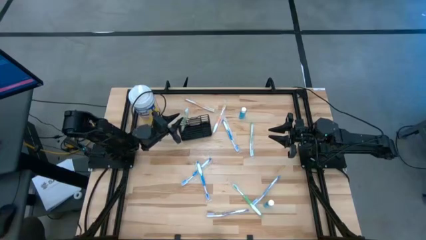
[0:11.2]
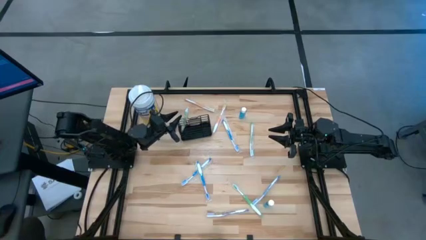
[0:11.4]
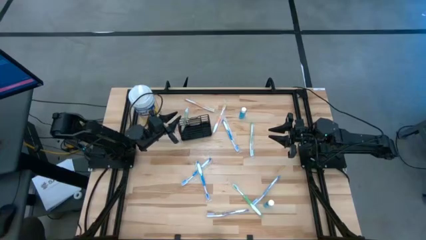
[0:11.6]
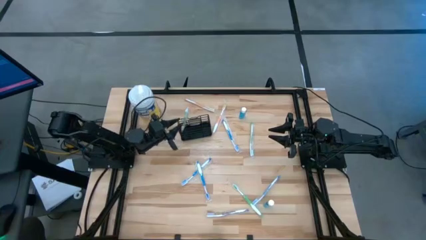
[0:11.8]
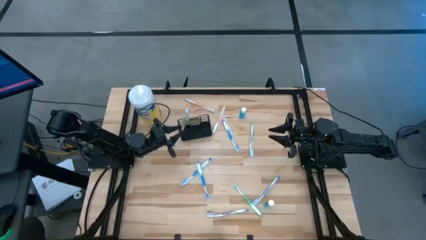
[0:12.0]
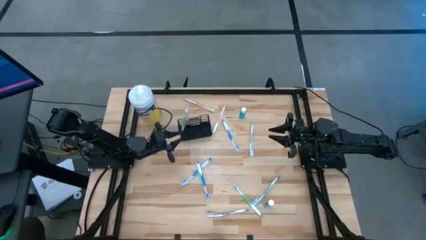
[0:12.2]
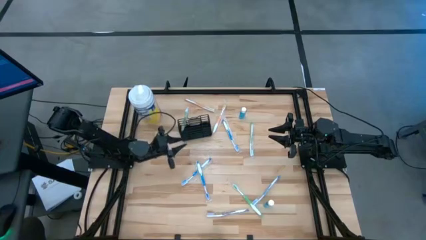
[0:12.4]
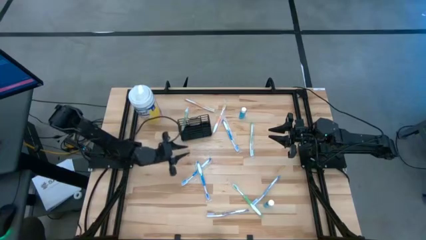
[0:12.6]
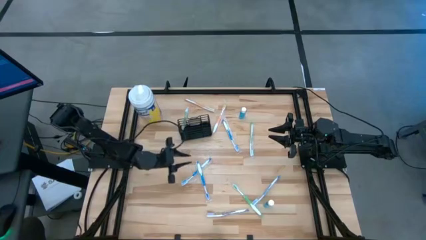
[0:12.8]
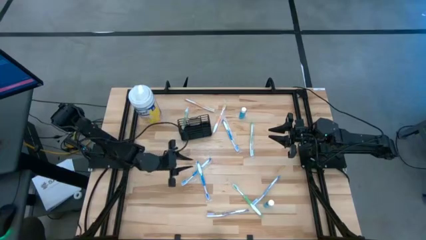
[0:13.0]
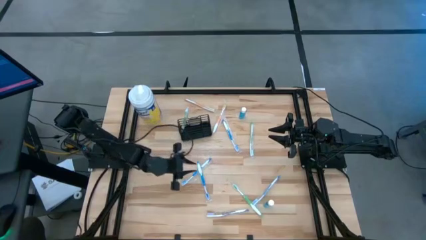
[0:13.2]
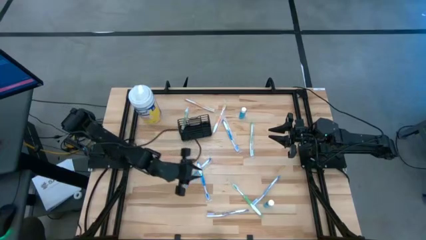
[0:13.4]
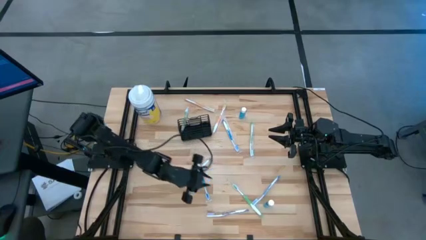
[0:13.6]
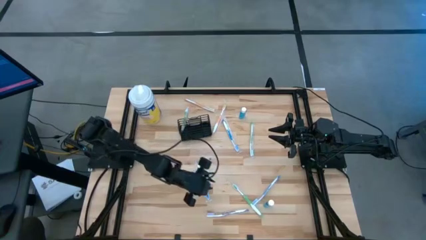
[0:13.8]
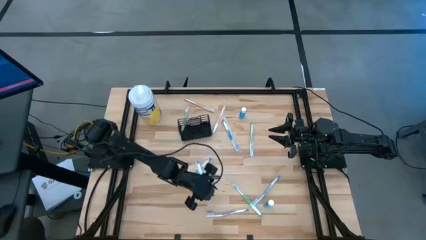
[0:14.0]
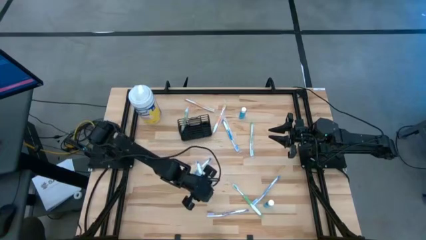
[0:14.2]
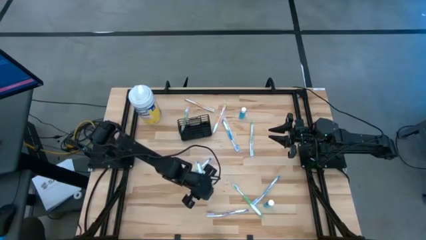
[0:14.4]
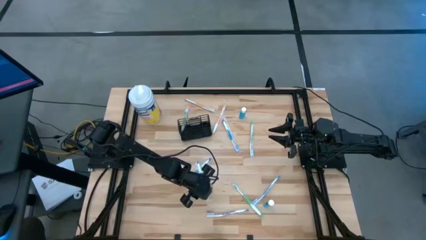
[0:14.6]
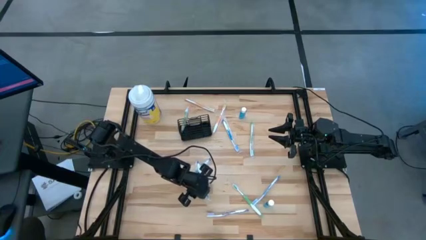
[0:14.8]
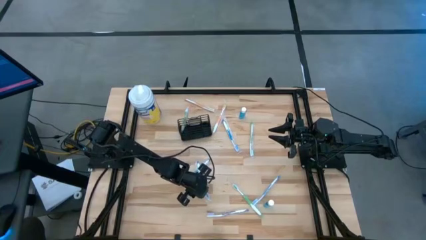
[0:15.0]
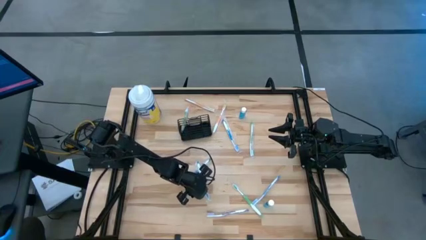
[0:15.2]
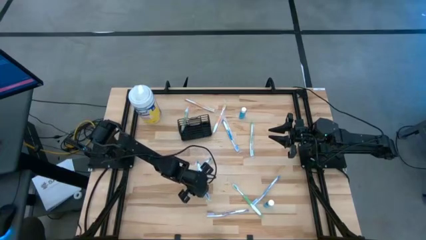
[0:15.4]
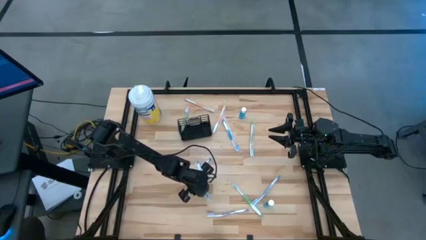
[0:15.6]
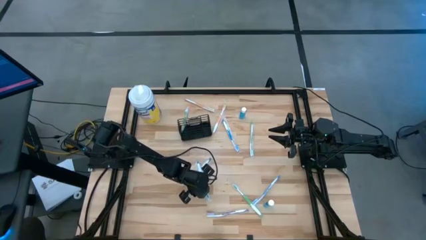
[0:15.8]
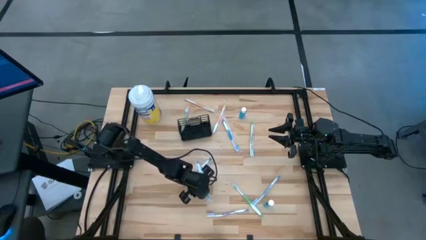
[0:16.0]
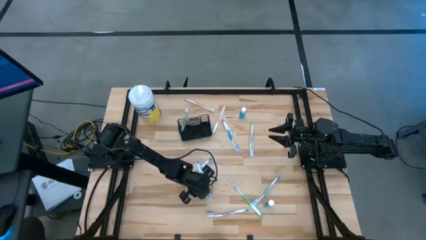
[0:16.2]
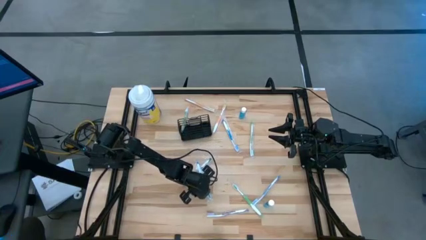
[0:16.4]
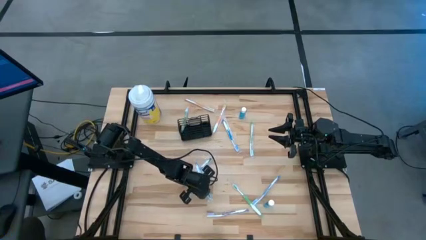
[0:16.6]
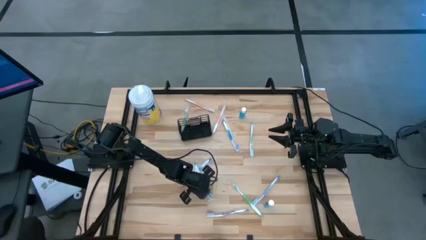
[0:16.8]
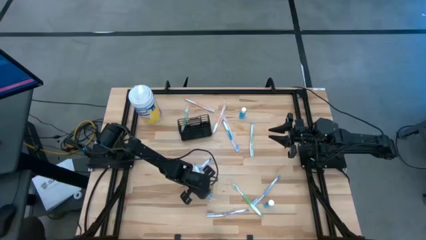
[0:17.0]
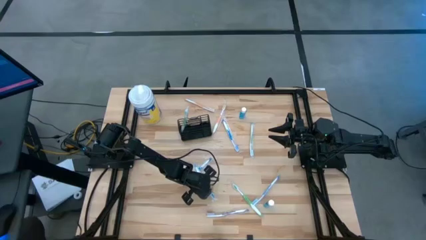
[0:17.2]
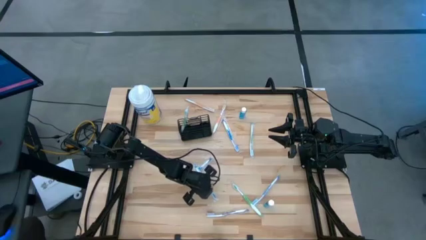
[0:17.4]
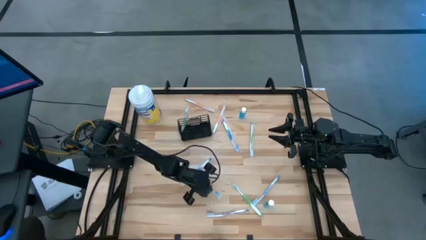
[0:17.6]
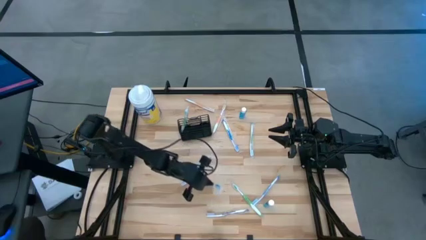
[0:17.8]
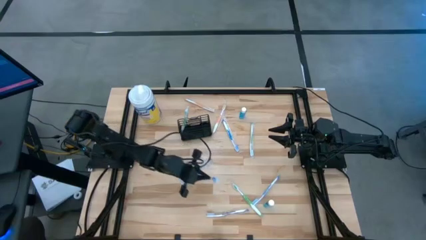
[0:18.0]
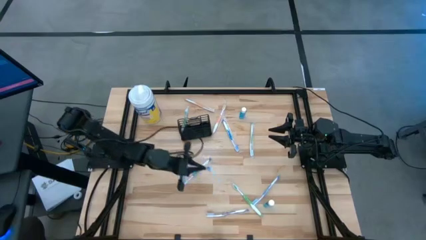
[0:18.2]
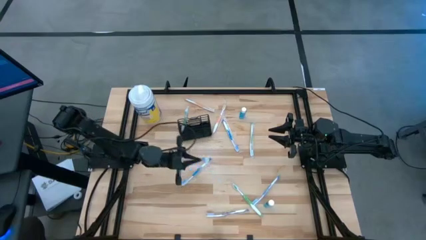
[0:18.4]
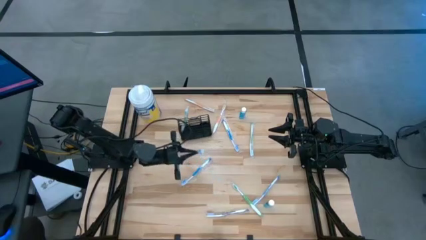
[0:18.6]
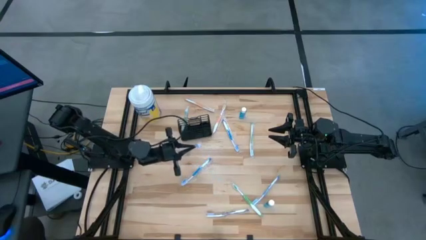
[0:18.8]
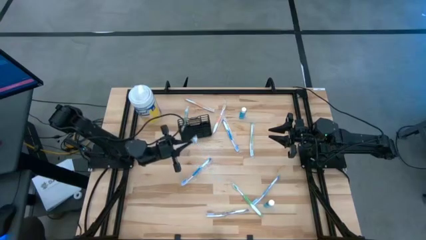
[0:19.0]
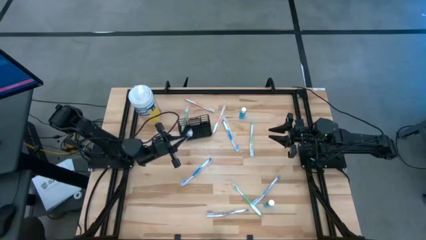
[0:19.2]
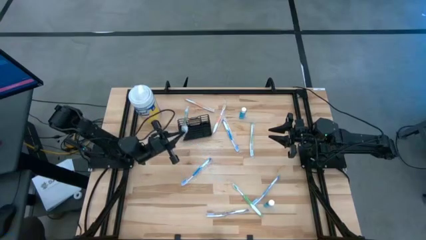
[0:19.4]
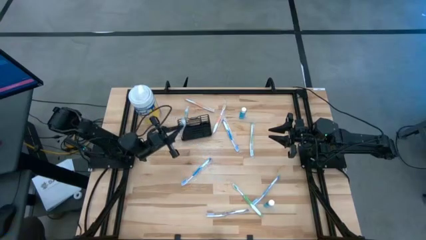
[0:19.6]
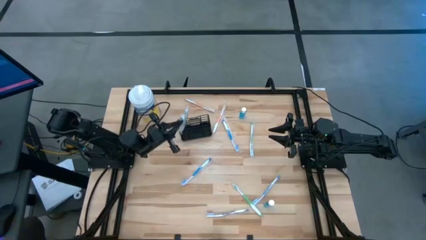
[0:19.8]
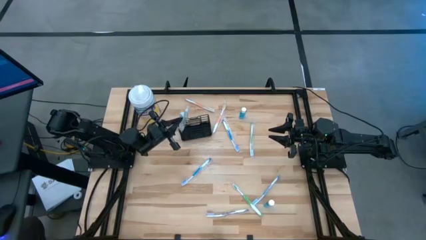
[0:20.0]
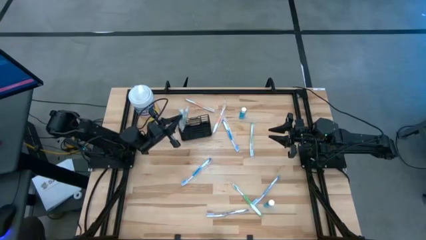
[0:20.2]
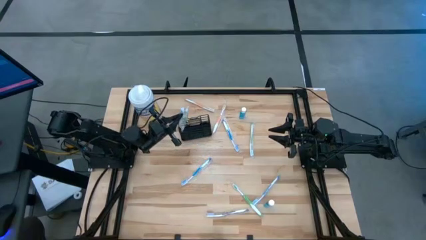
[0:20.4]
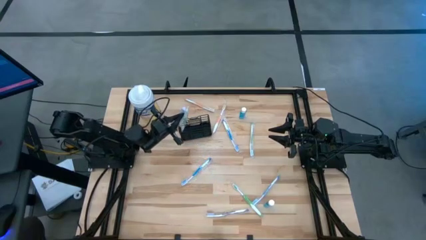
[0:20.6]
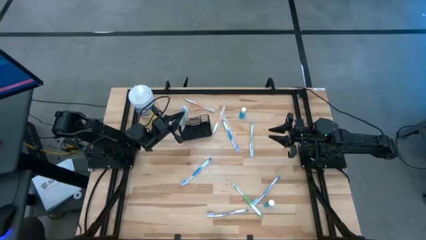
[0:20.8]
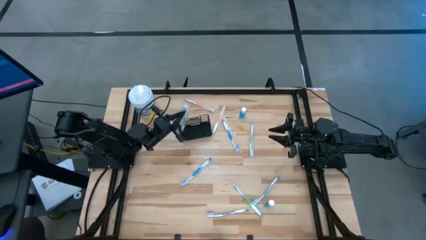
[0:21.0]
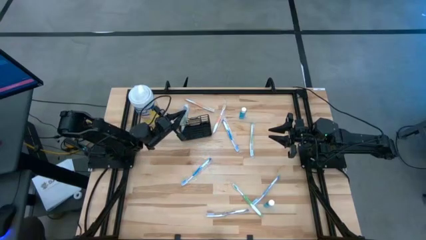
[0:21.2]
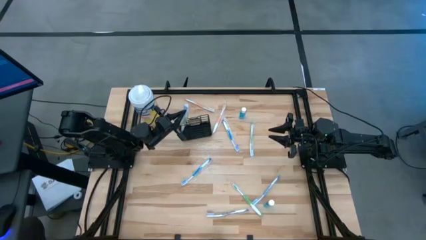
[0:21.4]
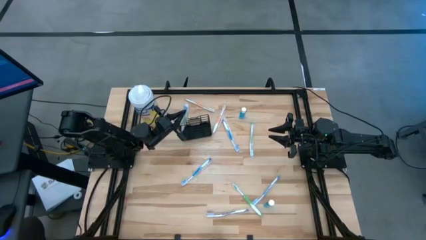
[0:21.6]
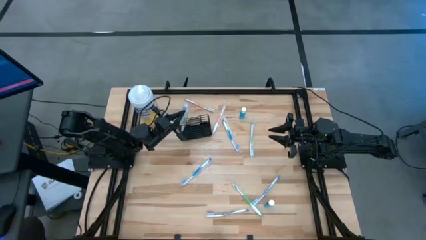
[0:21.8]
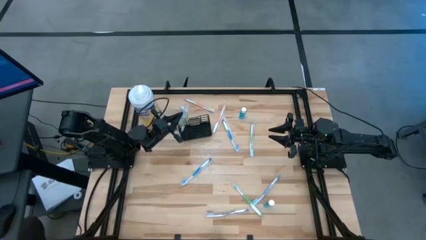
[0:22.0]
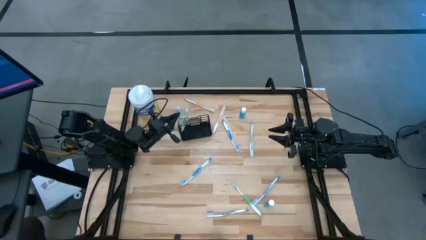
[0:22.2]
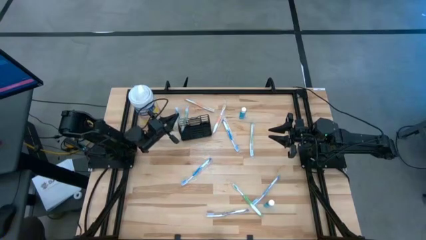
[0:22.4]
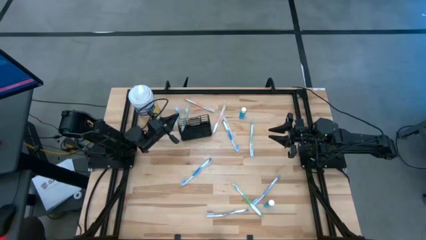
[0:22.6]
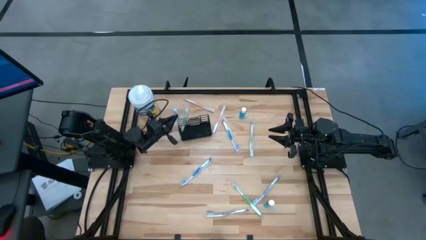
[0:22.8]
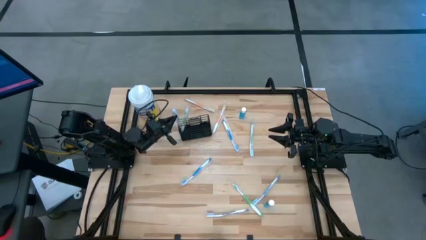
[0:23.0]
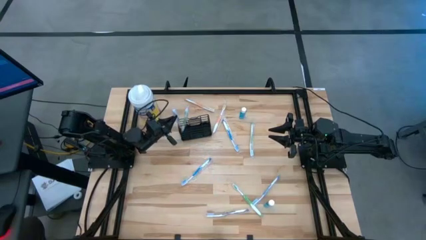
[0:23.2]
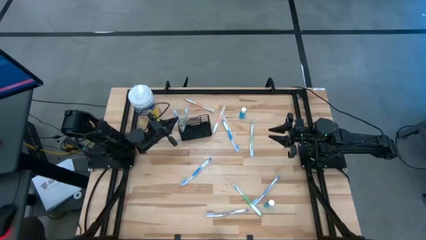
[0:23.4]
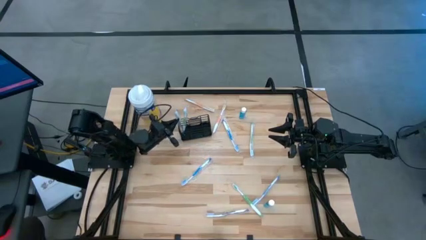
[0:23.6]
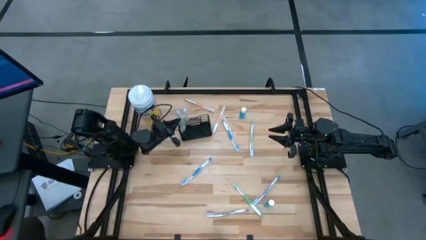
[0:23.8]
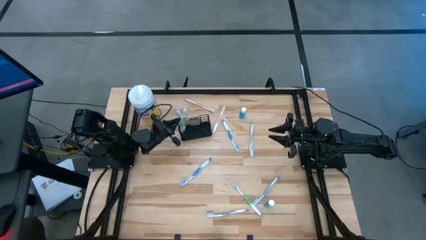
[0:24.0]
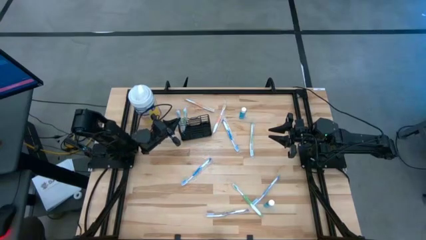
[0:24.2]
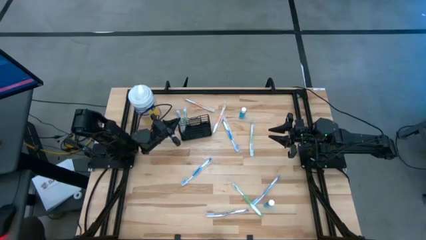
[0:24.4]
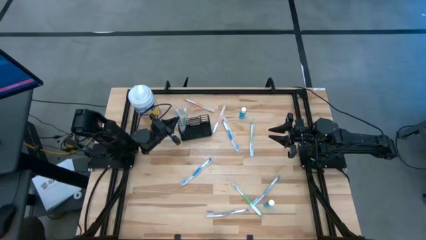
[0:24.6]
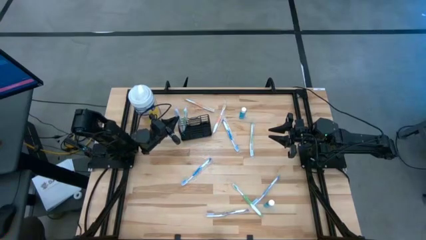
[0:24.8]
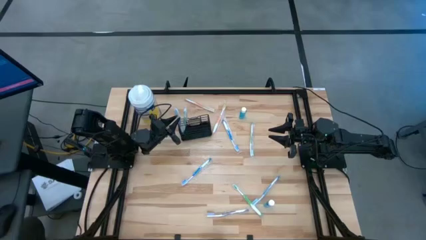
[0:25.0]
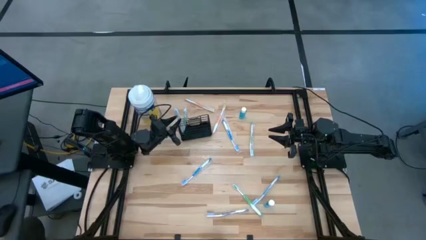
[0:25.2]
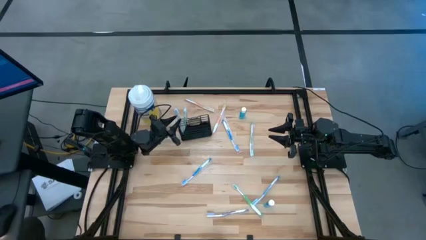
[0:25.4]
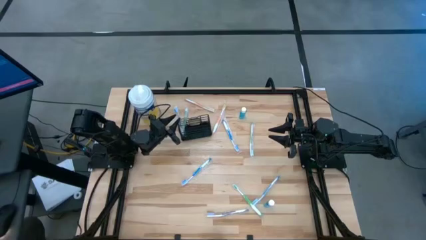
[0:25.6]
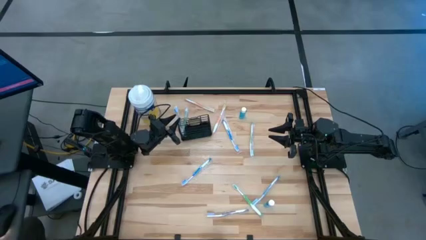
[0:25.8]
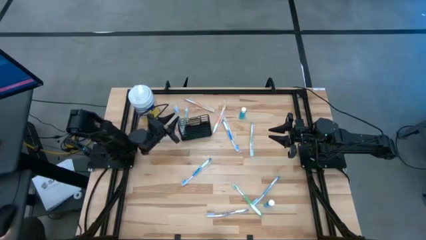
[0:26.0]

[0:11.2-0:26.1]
Task: Pick & Place toothbrushing station
Put the blue toothbrush into the mesh organizer
